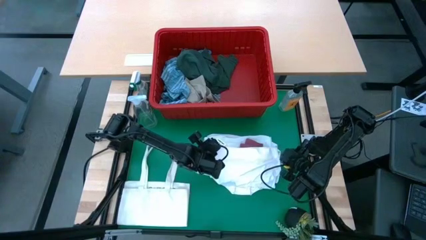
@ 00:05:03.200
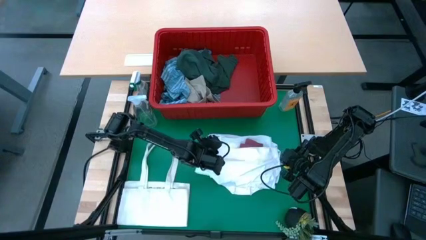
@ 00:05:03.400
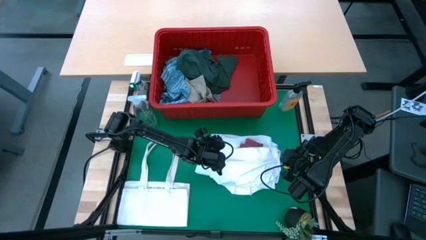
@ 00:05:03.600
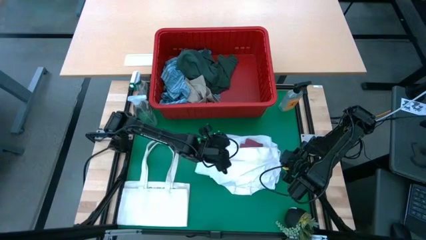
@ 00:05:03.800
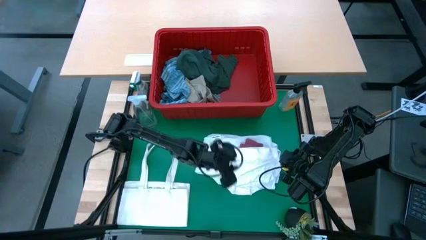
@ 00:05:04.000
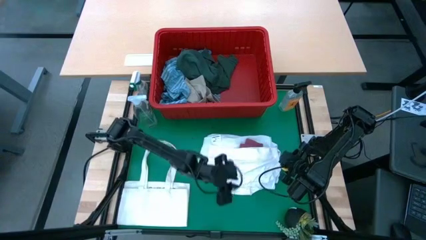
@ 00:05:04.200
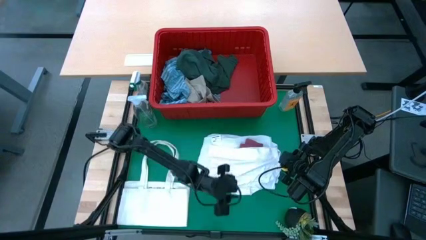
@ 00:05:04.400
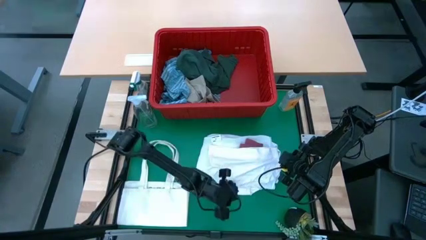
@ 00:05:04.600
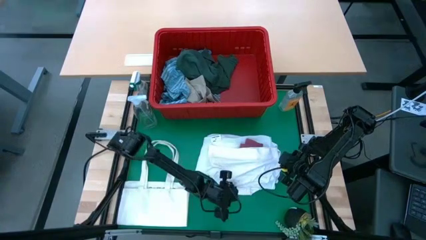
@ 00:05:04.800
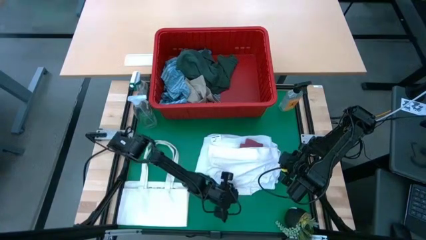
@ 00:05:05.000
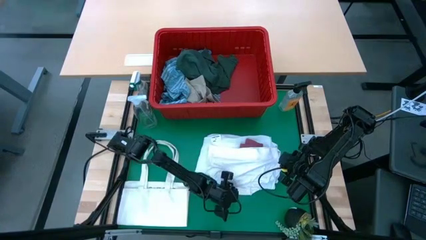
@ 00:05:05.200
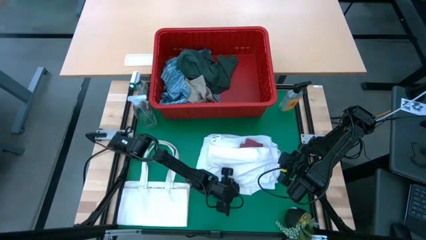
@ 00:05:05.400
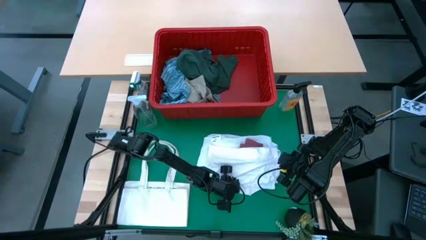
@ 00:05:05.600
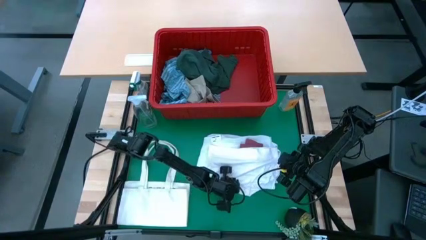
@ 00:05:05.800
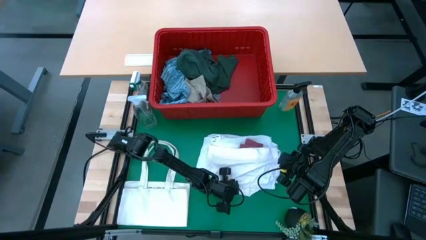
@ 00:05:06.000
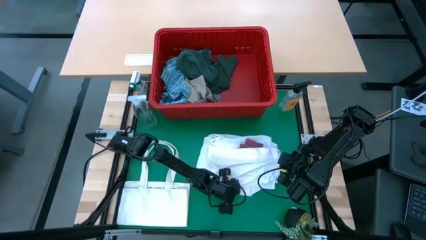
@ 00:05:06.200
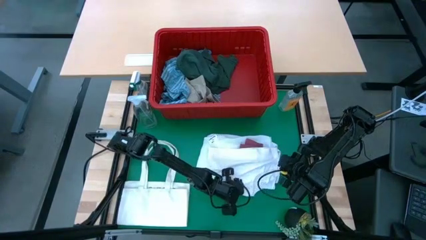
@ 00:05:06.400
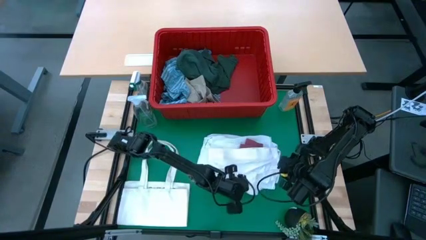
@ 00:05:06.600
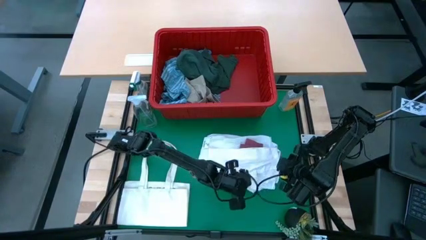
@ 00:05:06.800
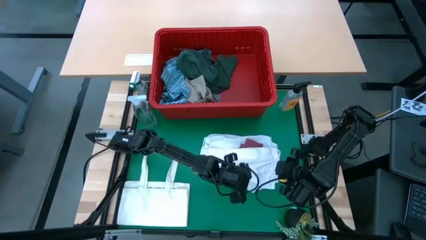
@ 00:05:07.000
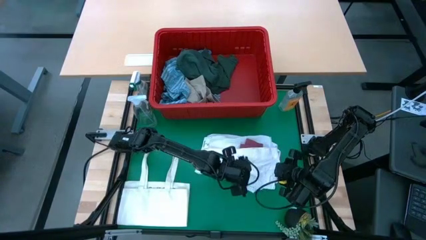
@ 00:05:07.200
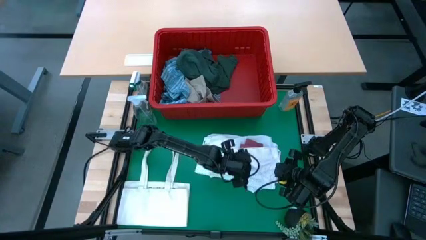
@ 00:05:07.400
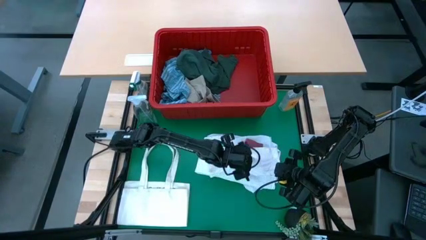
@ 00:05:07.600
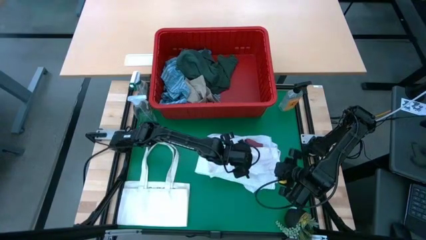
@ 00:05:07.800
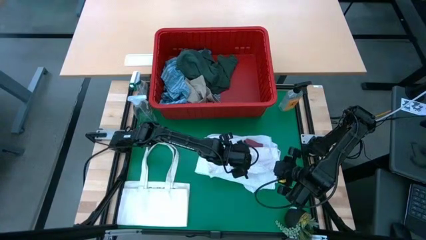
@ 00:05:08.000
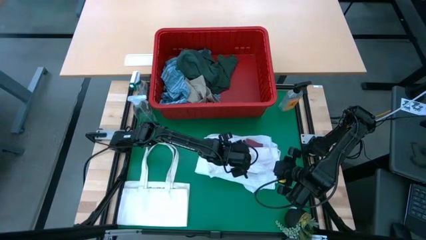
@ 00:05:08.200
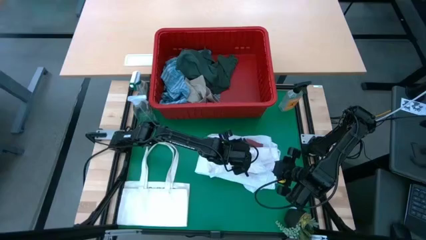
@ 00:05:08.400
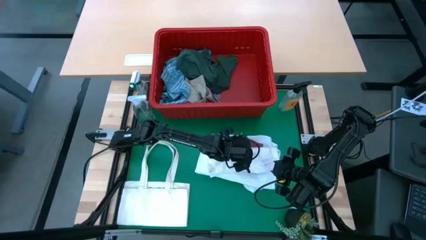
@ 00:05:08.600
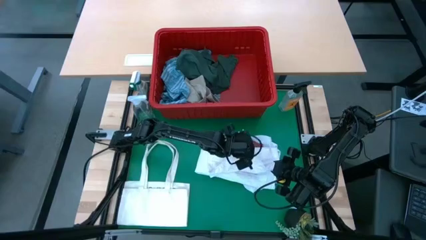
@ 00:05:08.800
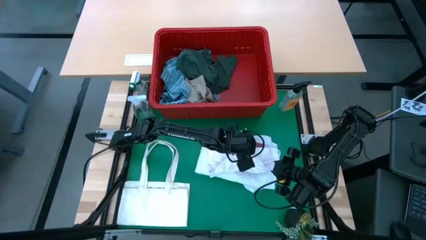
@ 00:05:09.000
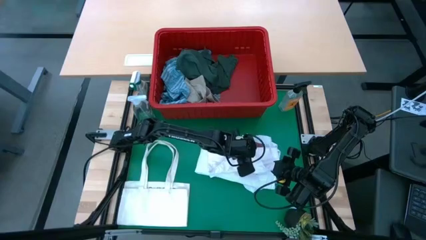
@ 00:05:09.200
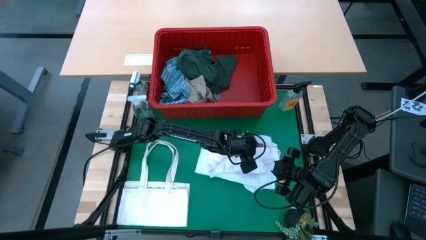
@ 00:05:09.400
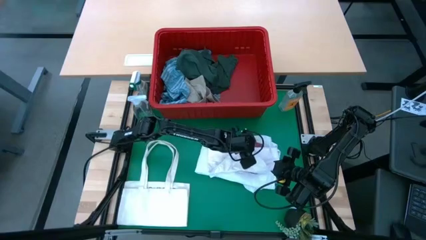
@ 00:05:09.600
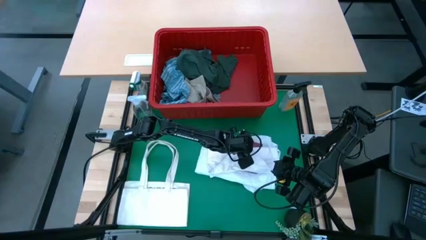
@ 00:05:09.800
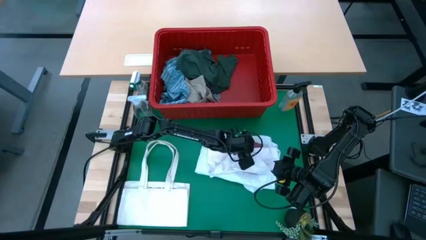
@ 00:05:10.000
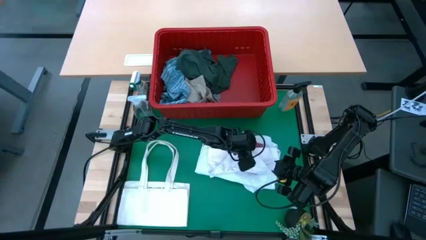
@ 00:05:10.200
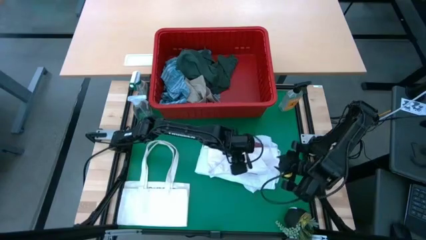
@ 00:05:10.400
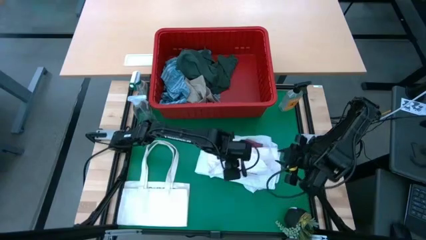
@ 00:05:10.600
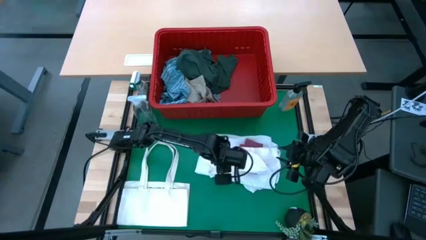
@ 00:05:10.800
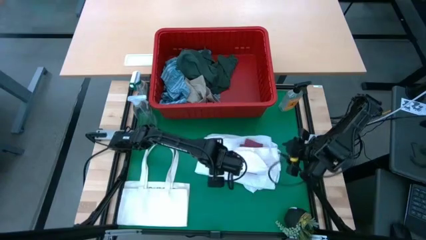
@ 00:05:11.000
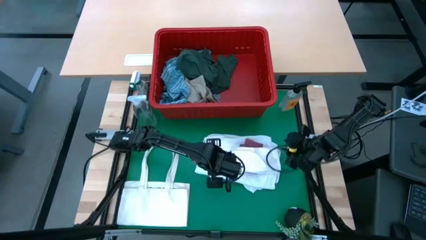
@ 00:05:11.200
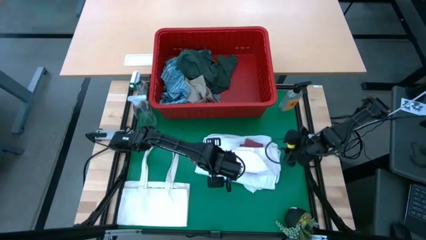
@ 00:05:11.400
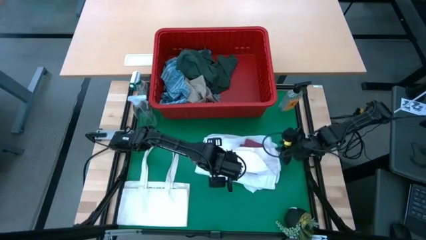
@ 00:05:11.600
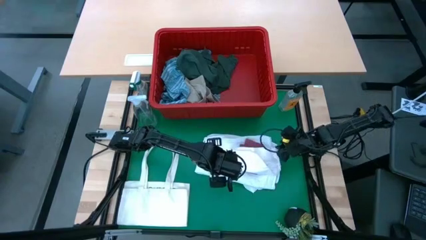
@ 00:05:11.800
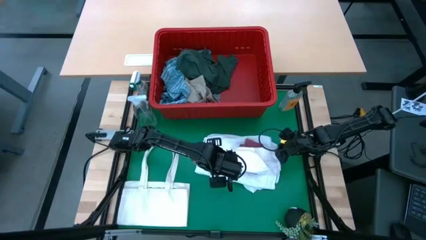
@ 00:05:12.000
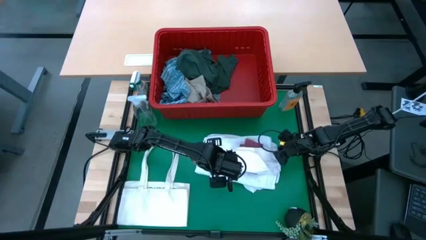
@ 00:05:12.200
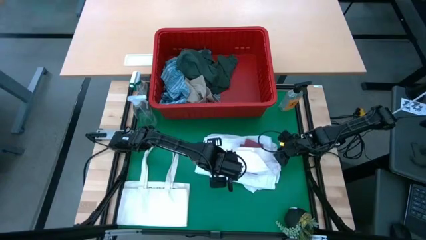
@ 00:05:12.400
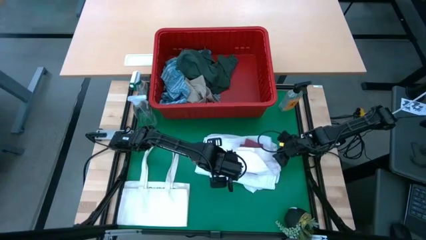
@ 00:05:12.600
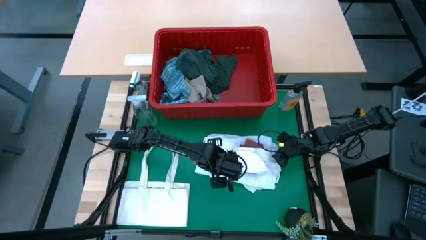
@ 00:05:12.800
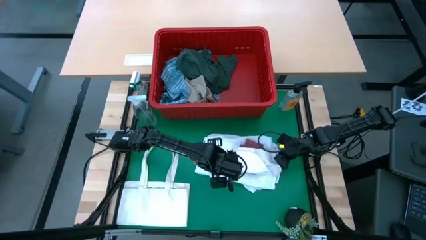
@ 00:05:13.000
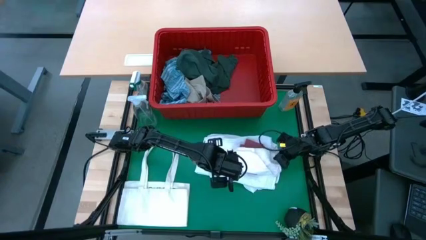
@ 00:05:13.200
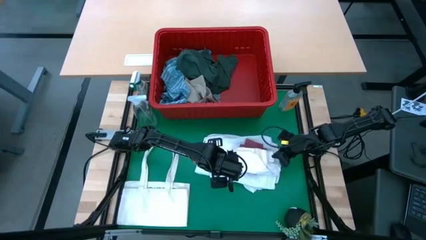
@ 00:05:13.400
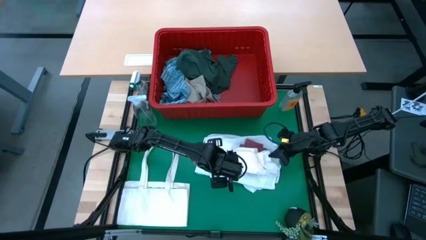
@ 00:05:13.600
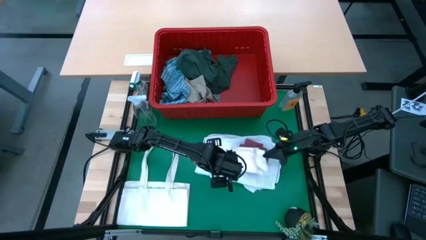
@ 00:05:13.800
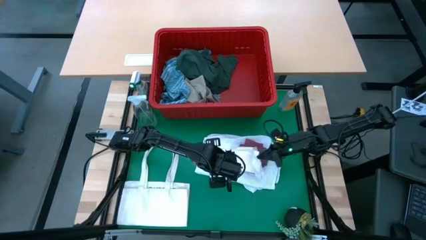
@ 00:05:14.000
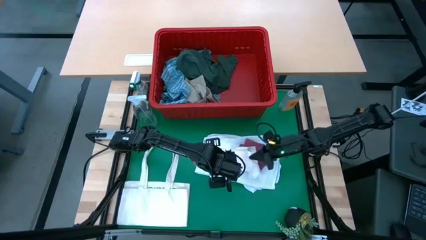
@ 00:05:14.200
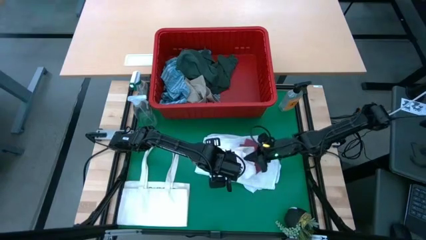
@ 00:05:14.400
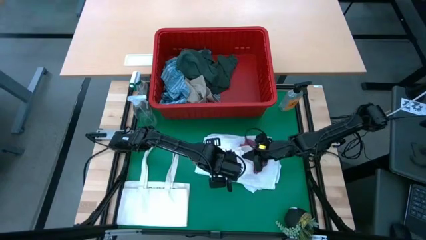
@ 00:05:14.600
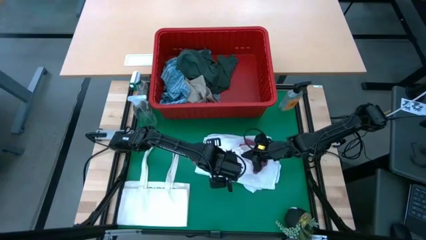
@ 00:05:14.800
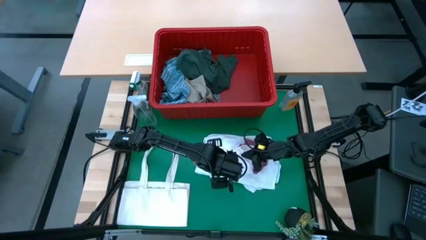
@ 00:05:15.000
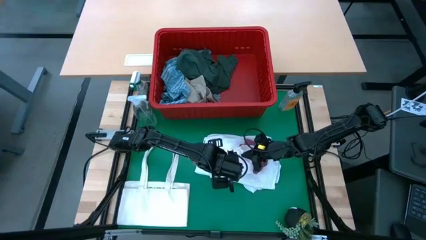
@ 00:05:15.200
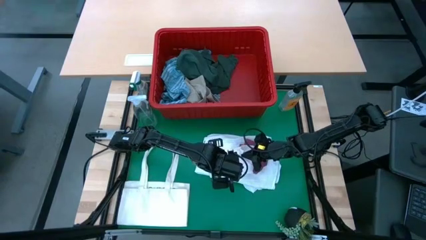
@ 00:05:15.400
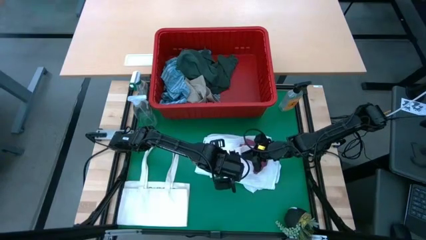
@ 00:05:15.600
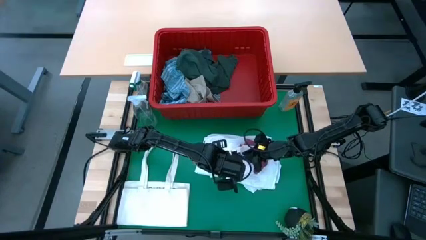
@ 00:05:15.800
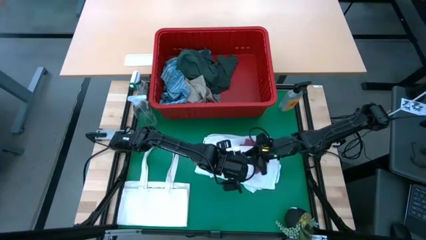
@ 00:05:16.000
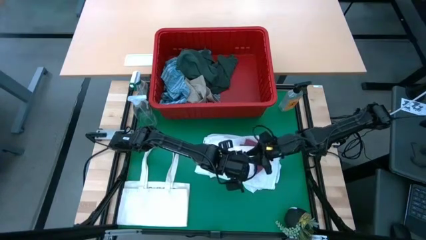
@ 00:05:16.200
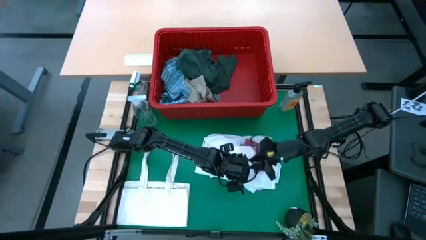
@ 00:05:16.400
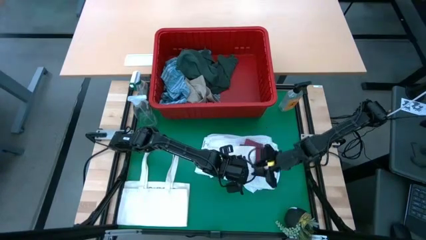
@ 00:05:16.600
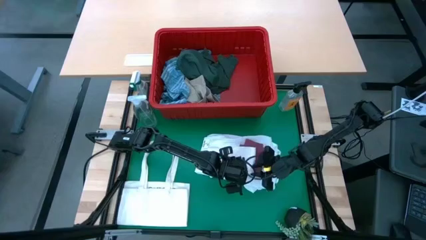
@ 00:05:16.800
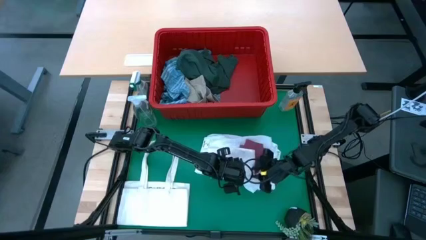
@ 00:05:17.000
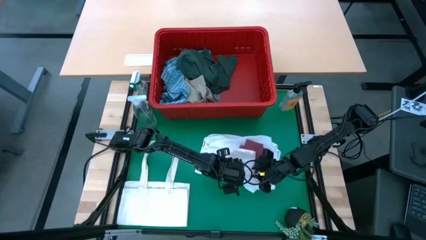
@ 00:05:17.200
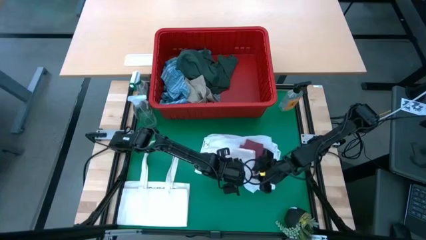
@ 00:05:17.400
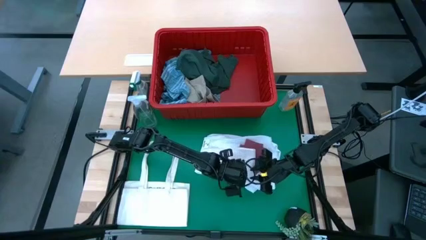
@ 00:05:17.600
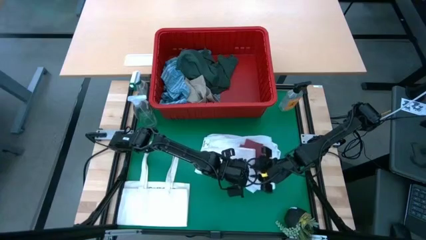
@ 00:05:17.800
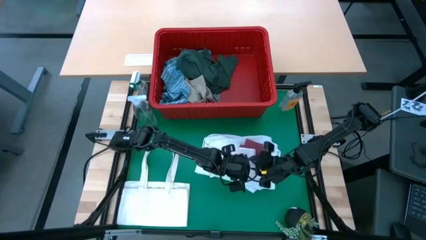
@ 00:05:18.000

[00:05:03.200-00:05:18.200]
Task: Fold Laundry from Bin
Fold the white underwear
